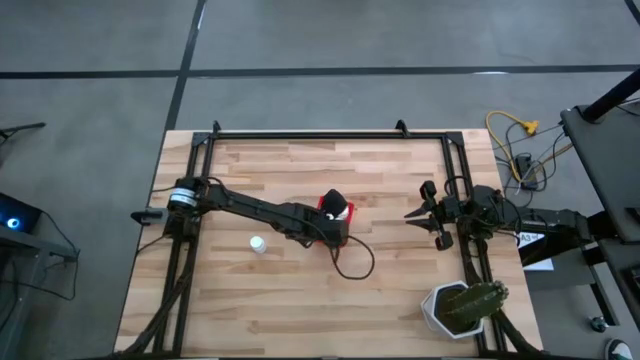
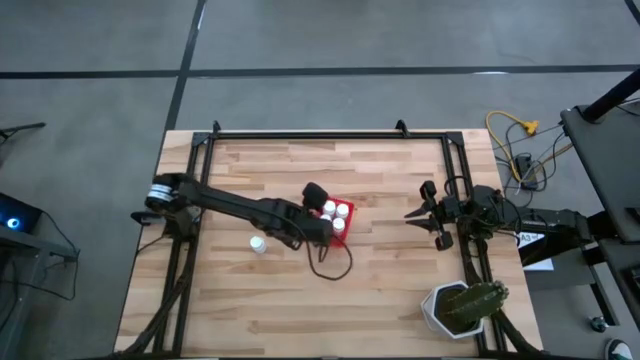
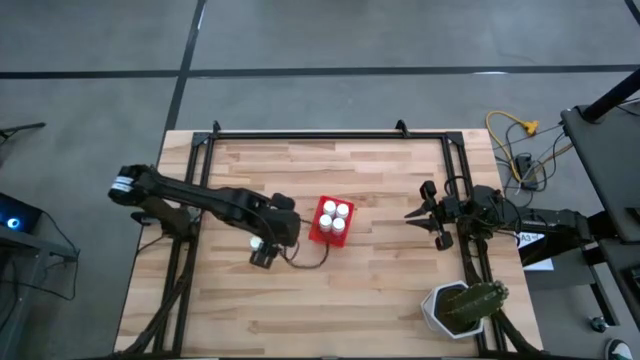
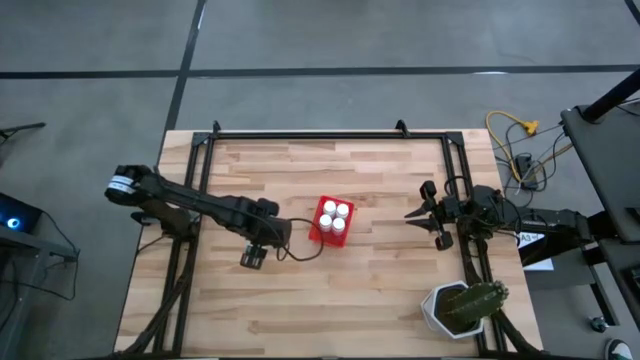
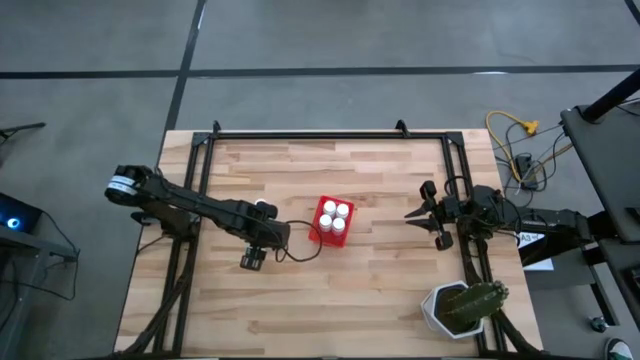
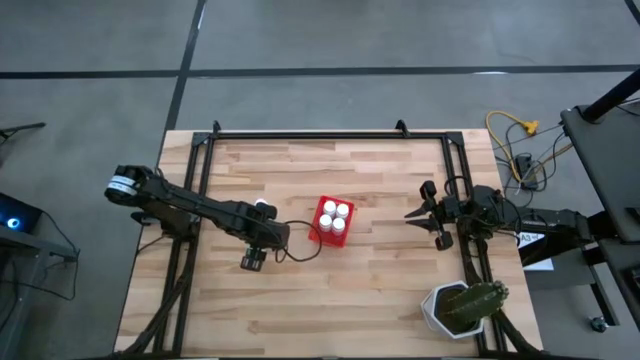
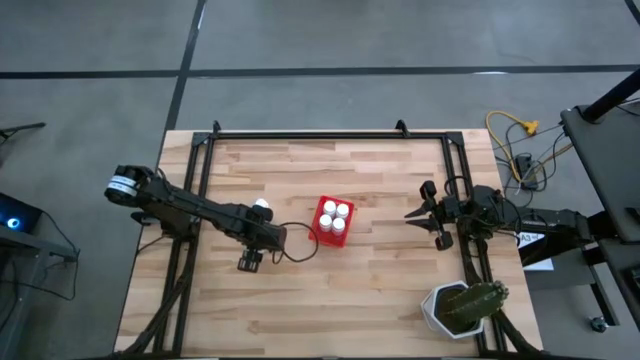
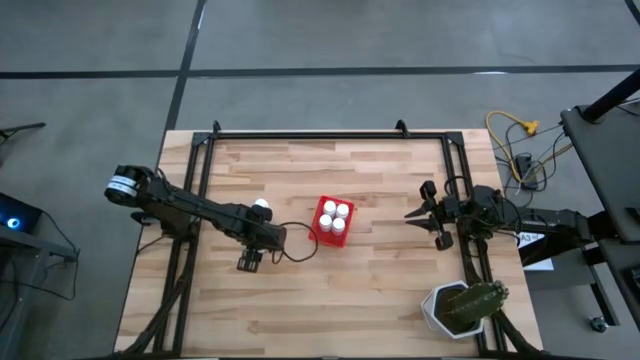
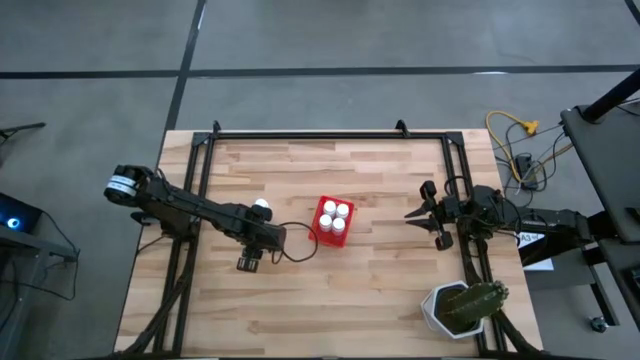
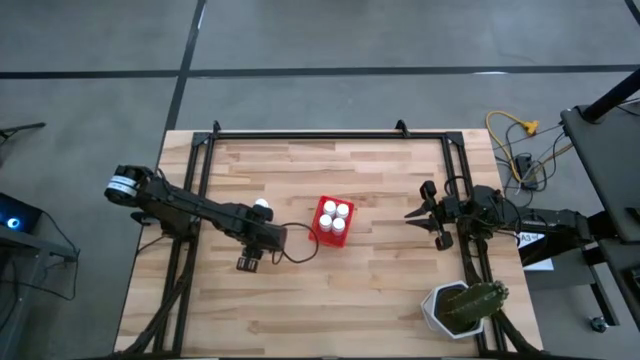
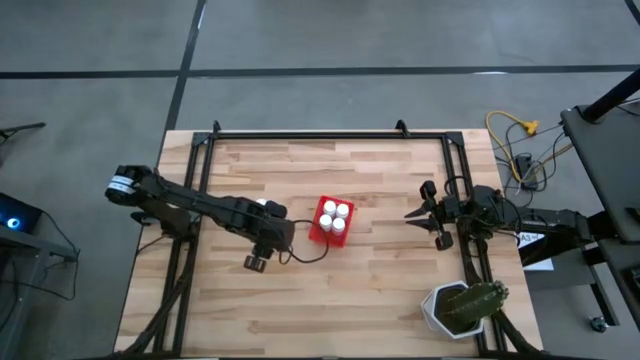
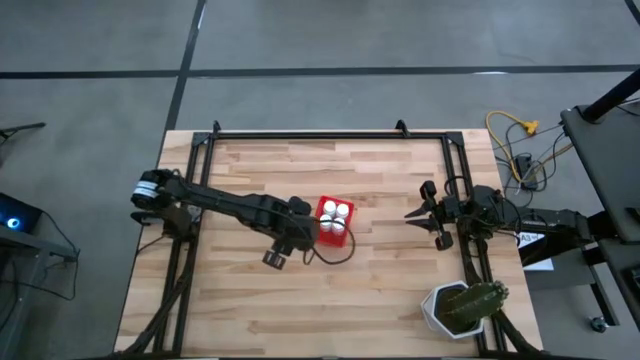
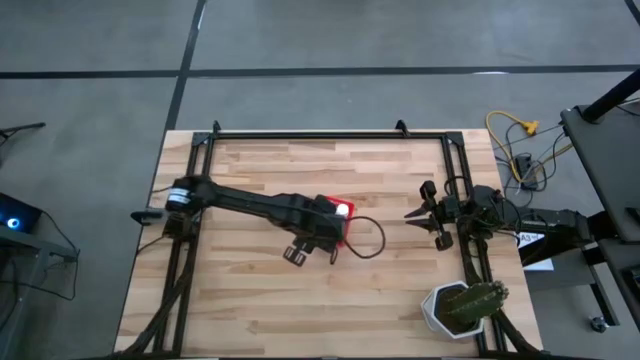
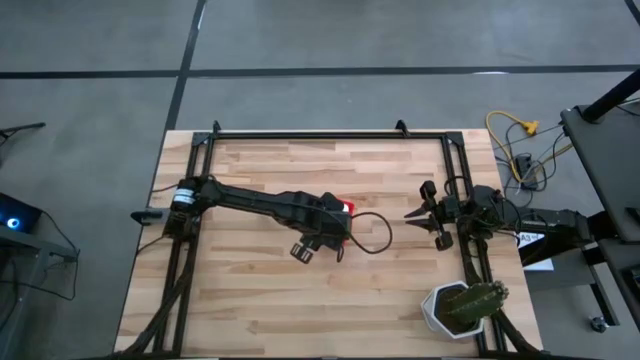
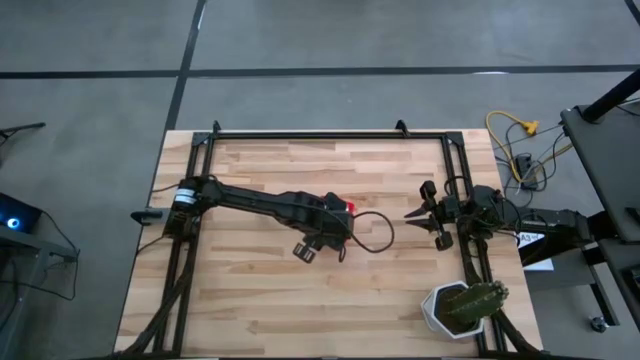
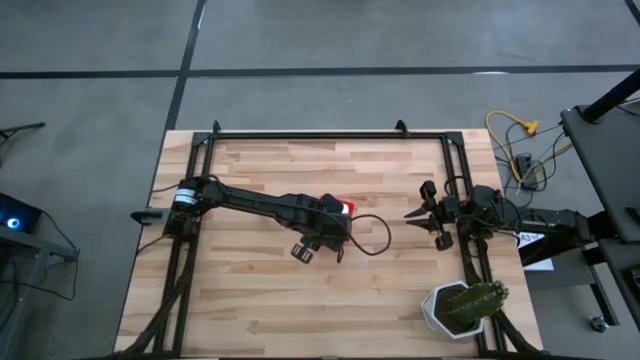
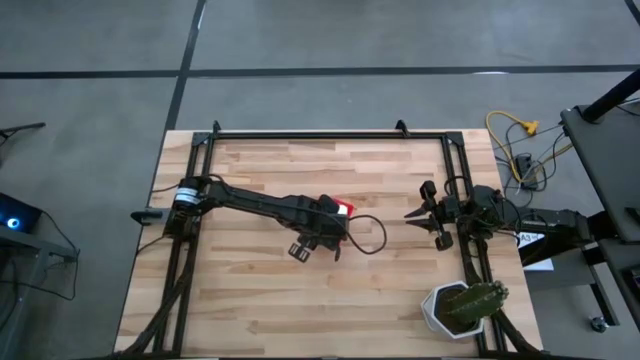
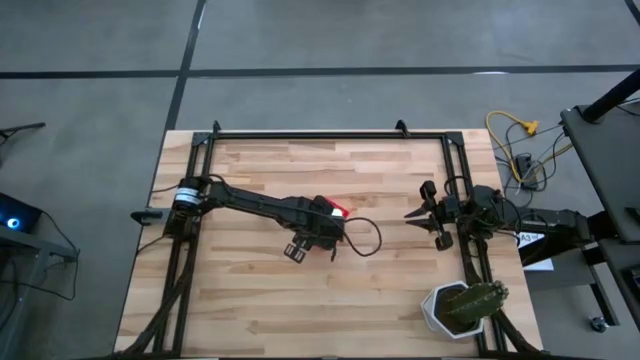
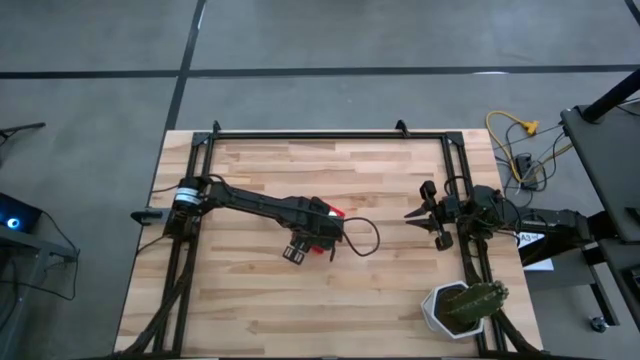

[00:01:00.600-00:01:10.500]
Task: Pick and place pill bottles into a basket
Put the white medicine bottle into the red bin

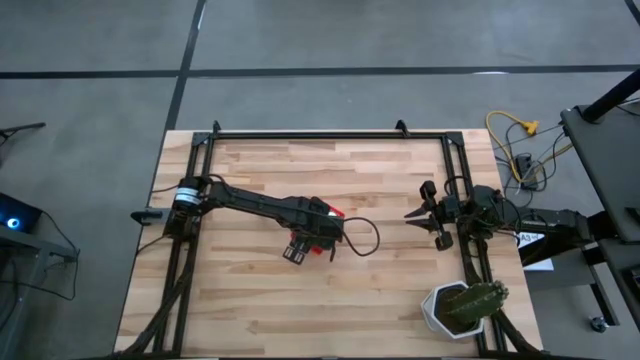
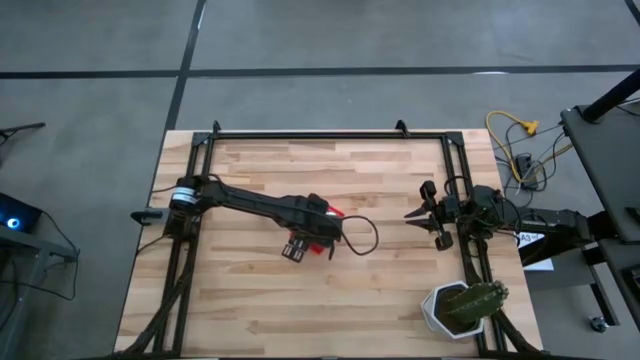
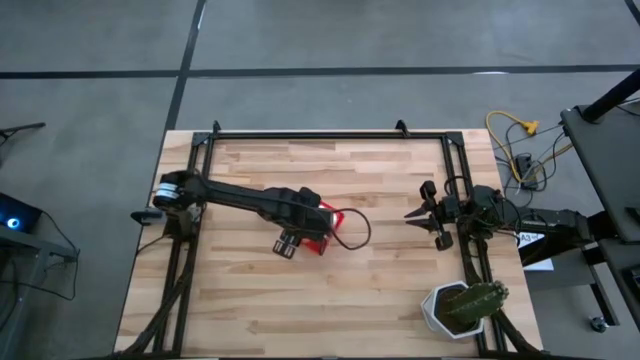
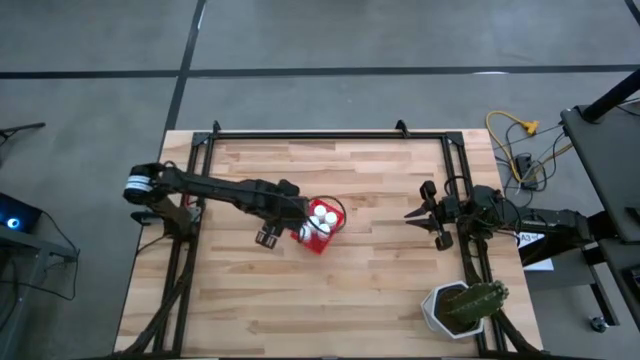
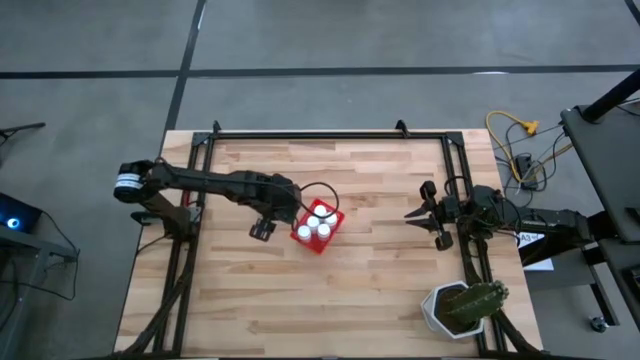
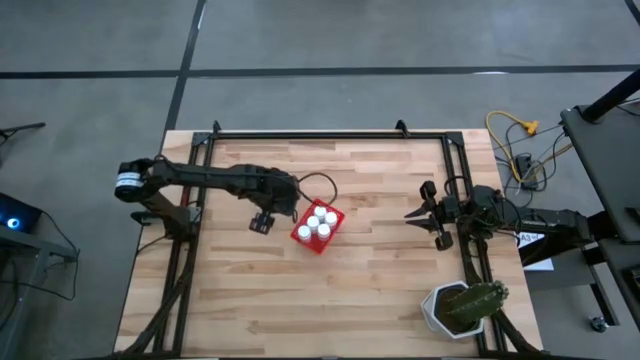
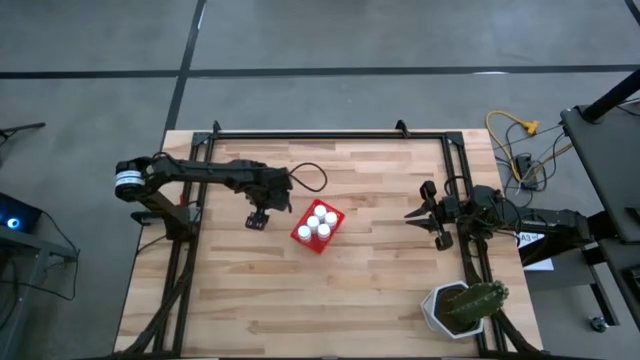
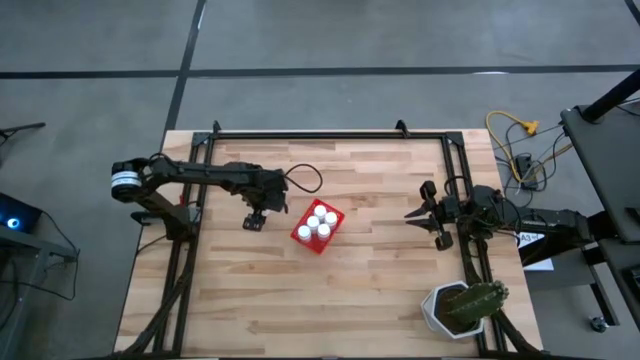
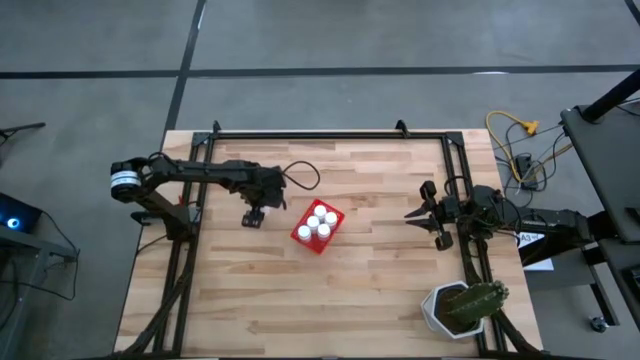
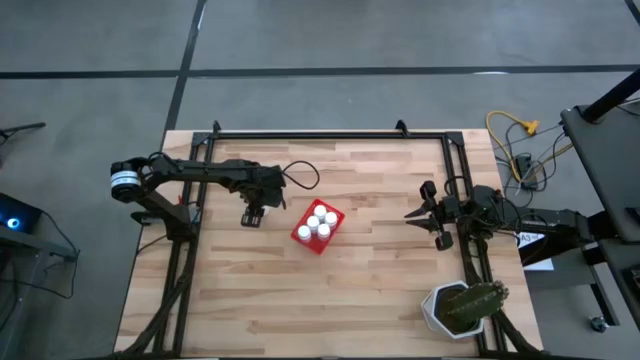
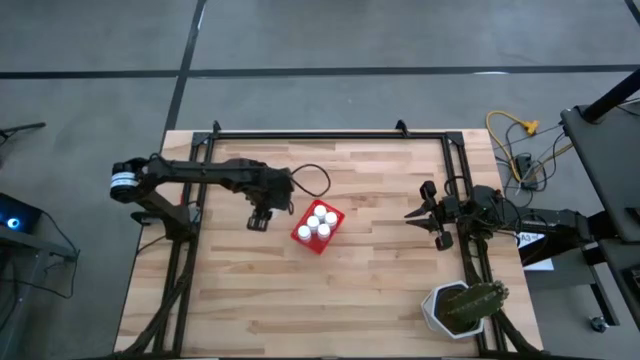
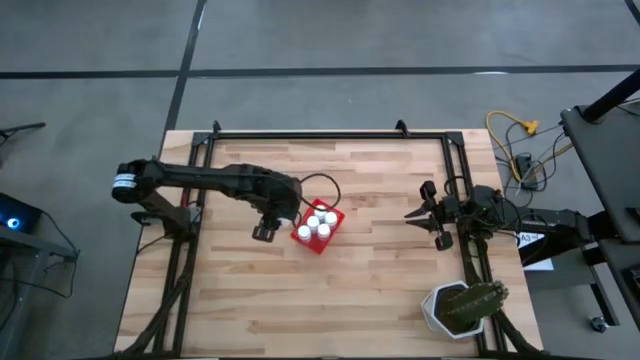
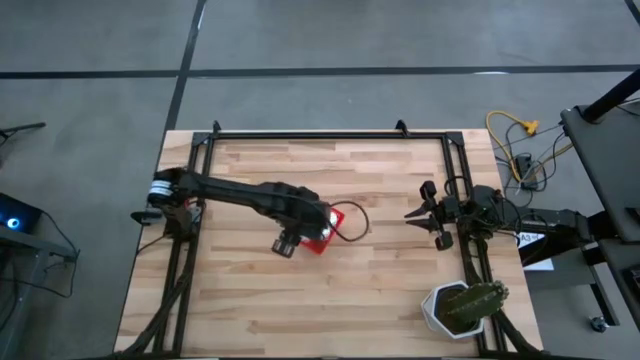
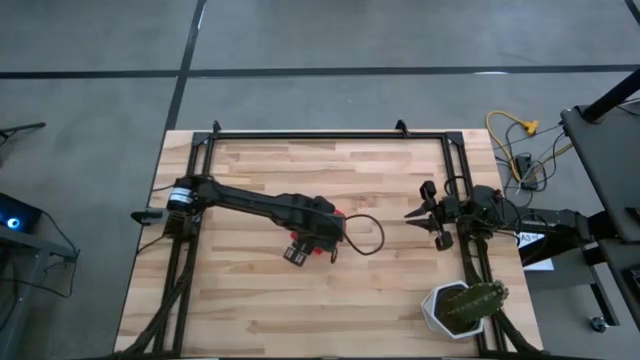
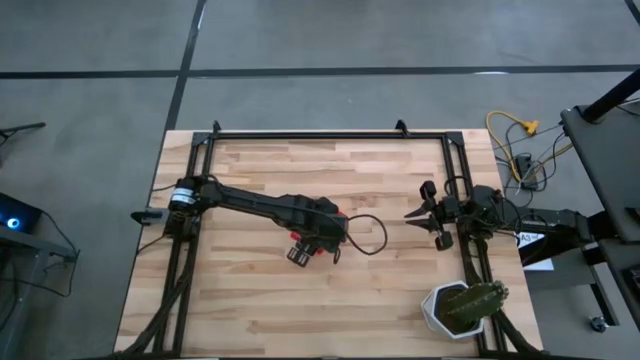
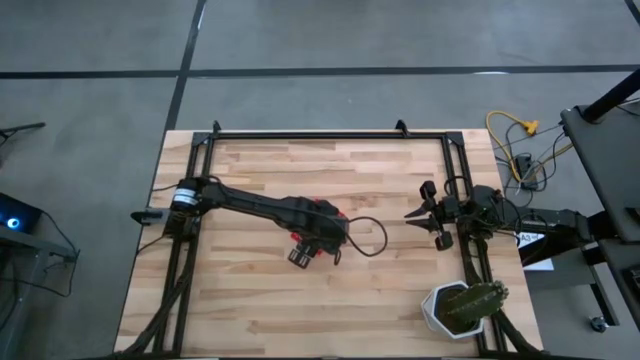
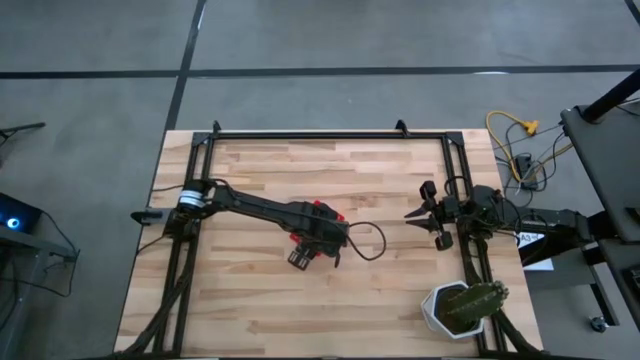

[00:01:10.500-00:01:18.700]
Put the white medicine bottle into the red bin

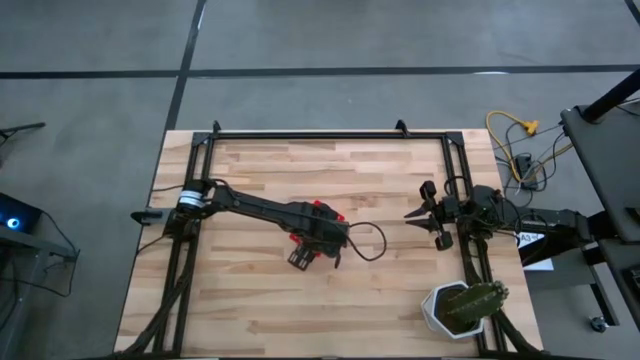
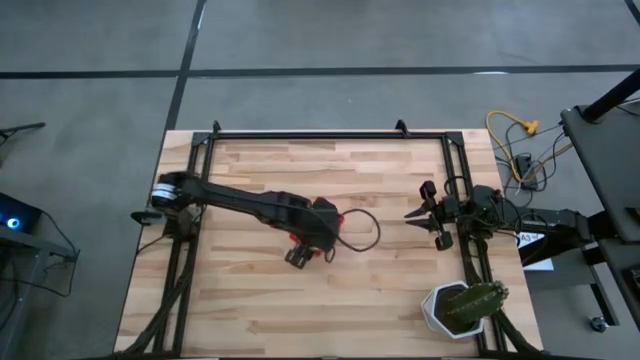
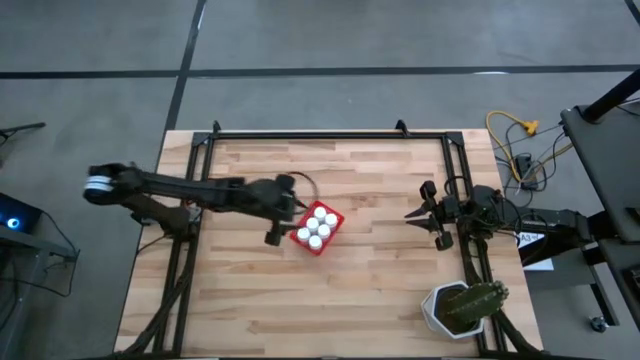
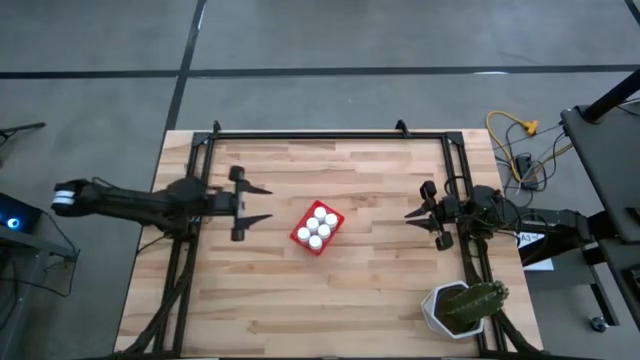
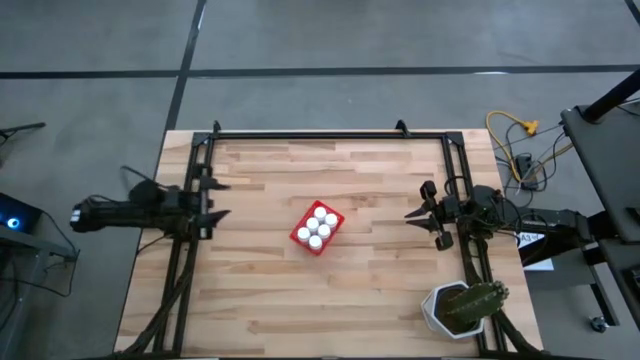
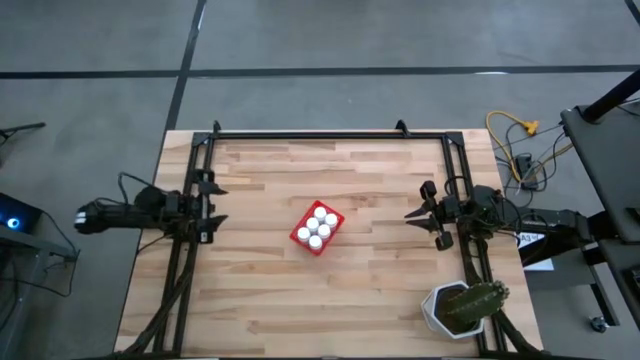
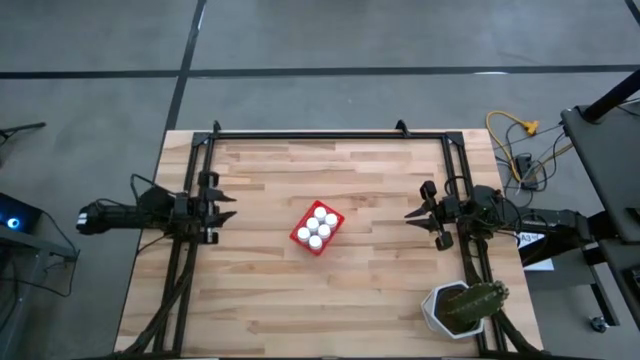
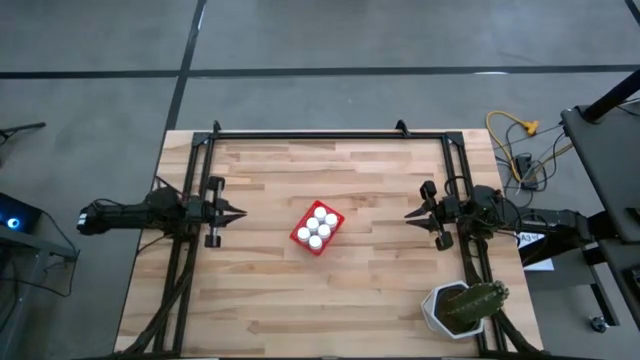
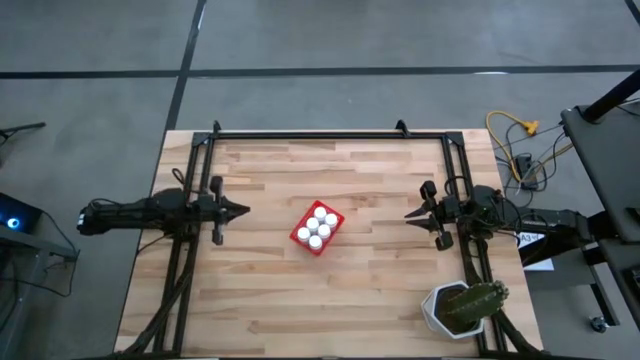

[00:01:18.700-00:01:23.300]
Return to Home Position
